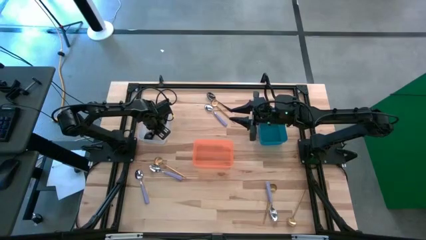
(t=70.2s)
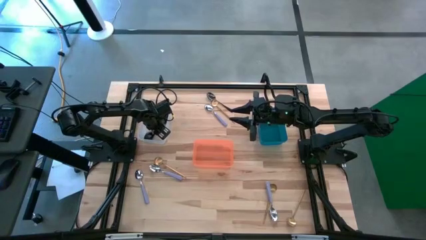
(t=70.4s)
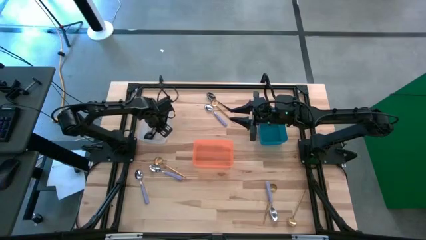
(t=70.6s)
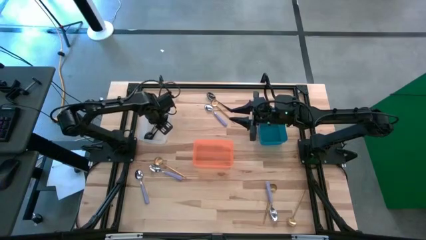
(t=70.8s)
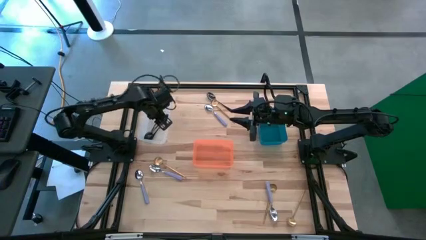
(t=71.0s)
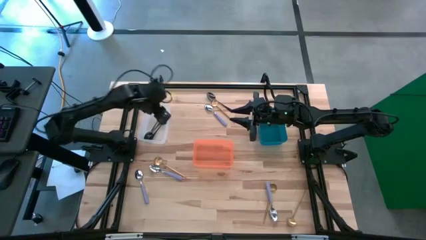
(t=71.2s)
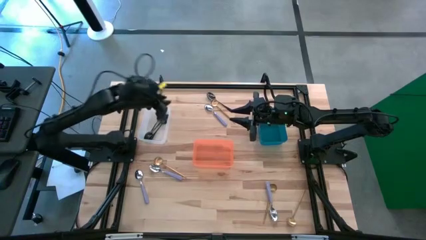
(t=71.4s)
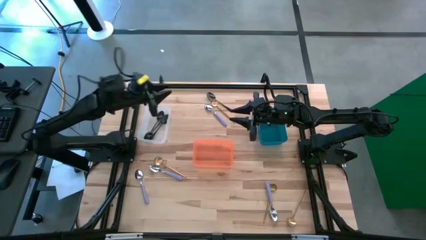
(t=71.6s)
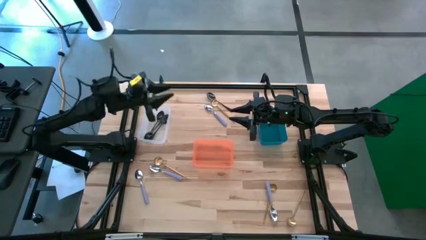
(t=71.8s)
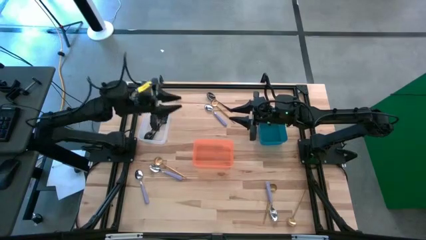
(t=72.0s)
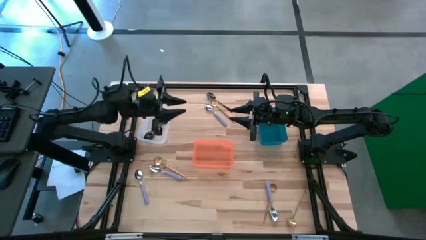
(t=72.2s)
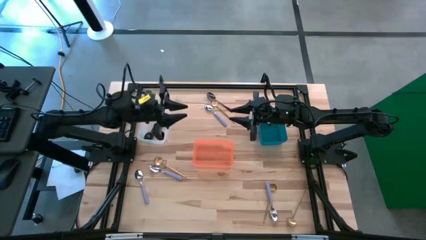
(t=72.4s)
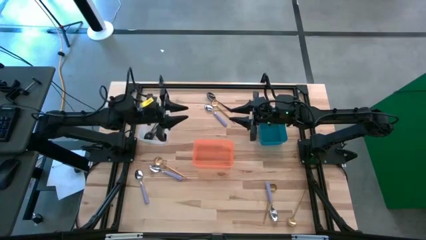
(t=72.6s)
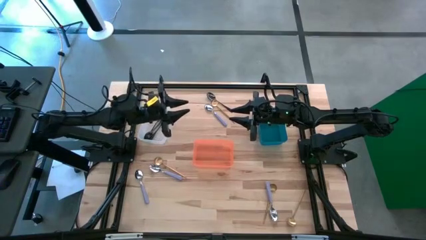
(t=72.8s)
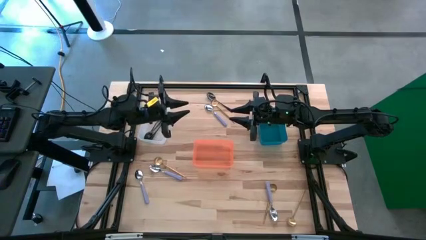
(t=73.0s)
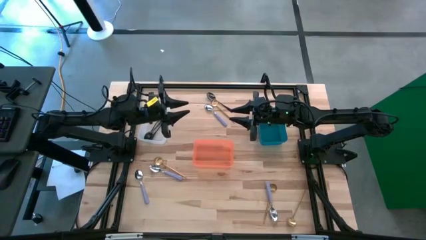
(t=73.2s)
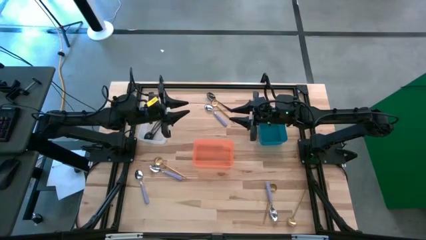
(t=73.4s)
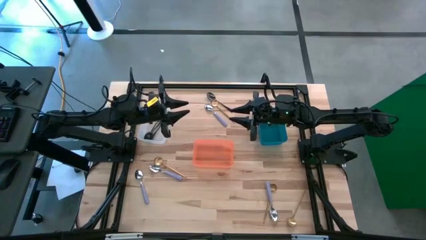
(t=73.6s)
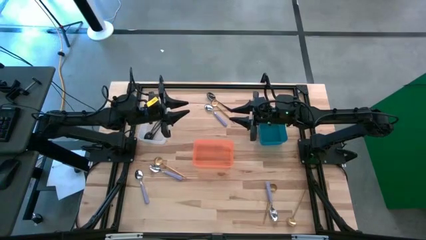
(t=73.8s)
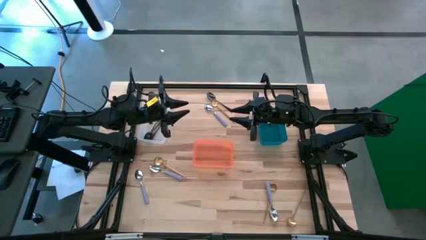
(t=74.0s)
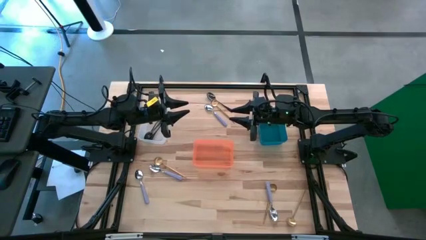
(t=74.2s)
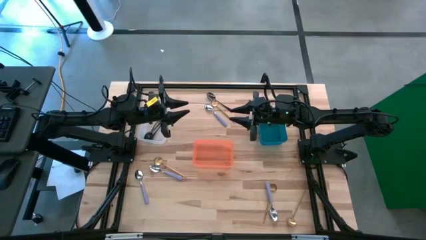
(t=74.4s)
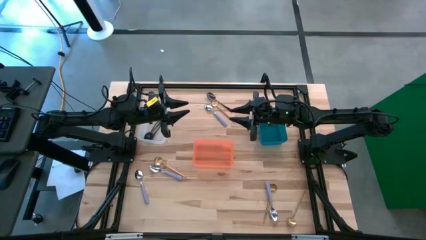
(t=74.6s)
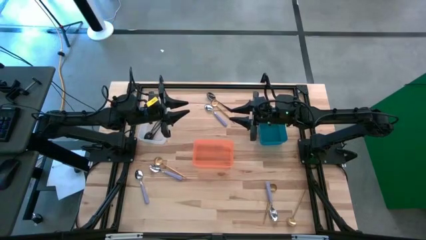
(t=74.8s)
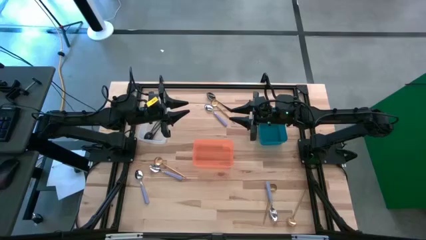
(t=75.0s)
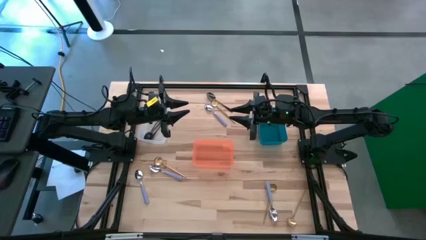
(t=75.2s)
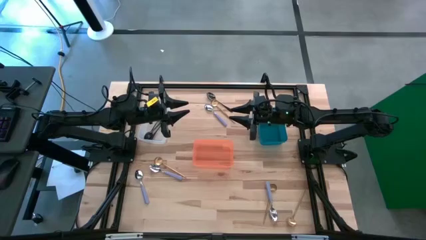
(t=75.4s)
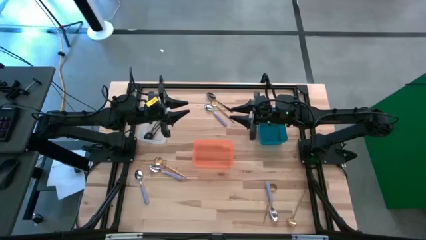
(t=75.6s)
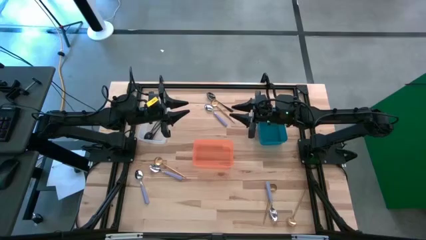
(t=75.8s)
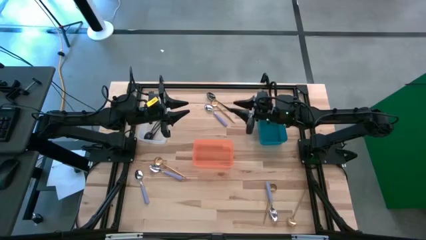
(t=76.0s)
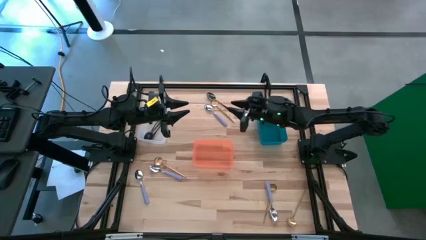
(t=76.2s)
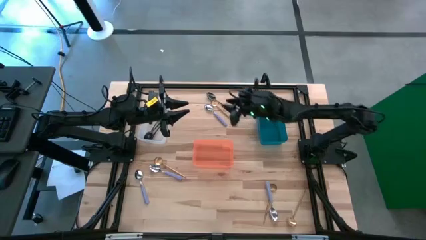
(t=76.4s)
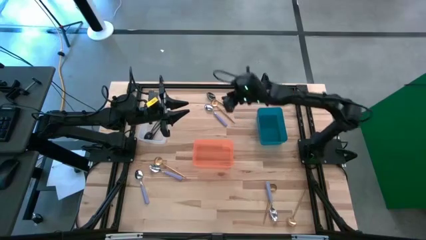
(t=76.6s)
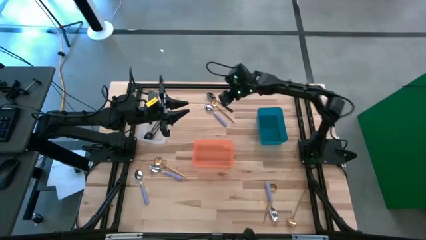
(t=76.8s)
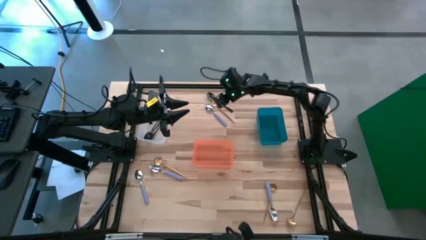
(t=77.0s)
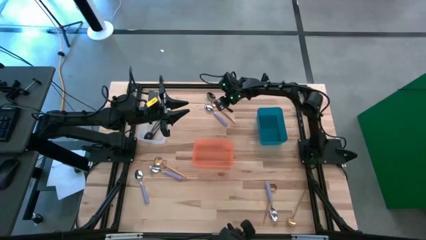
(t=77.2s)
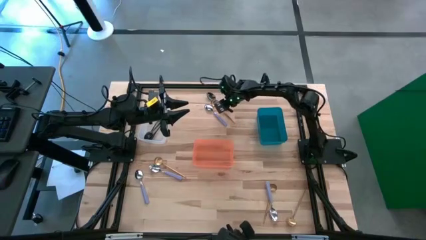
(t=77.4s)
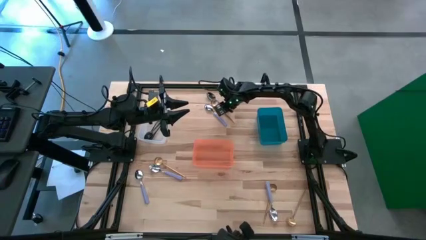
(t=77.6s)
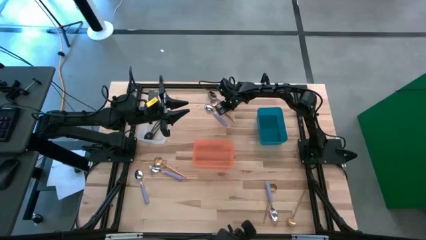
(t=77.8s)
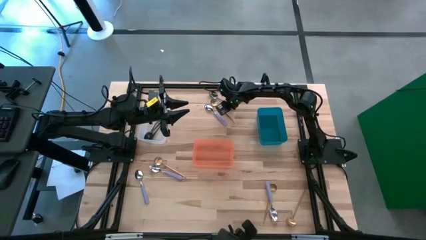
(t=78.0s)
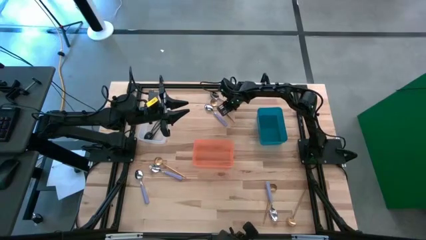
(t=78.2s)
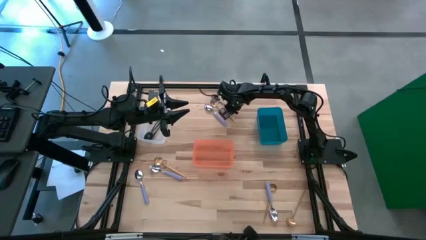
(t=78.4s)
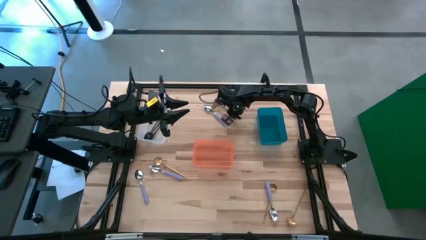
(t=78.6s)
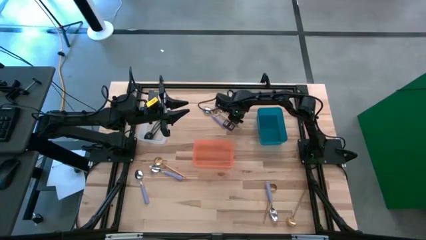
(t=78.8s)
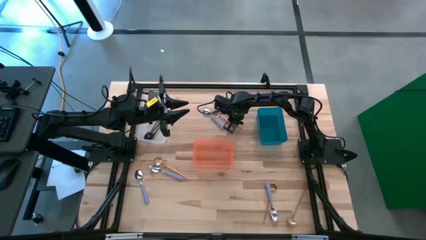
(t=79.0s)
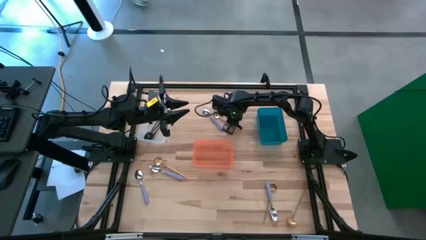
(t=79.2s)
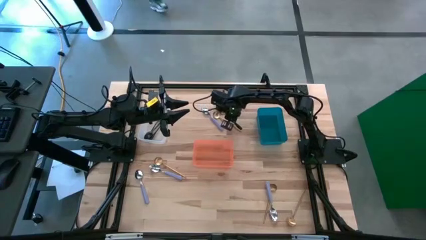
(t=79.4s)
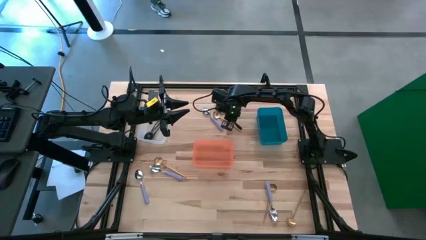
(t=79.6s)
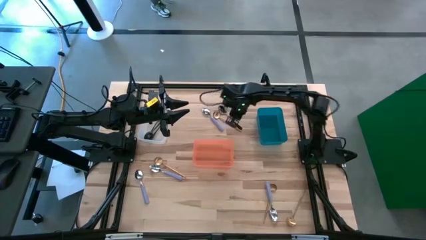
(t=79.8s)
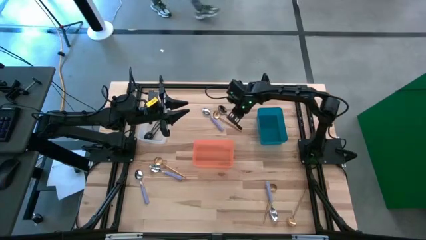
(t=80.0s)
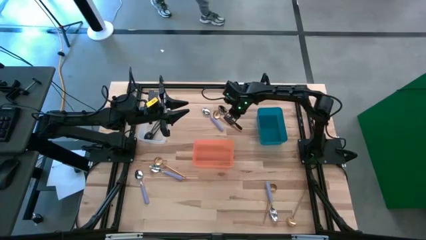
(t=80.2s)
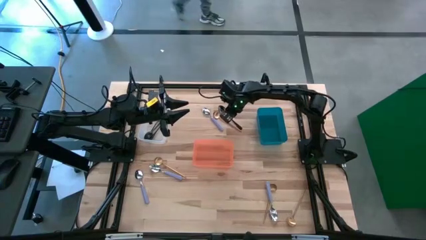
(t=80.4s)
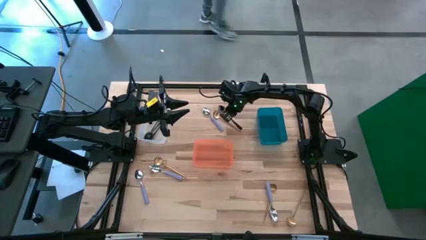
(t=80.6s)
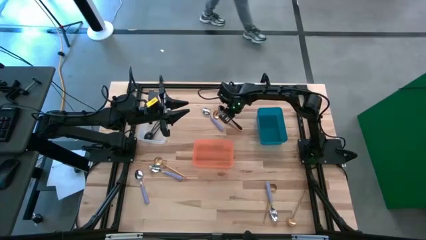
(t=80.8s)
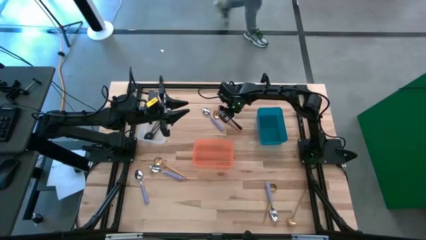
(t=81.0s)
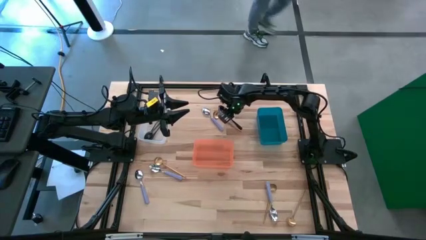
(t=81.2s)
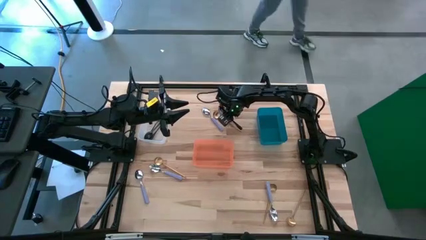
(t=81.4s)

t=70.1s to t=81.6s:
Task: Sort silverware by color (type)
Put the black spoon into the white bin

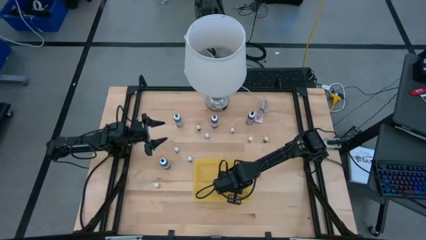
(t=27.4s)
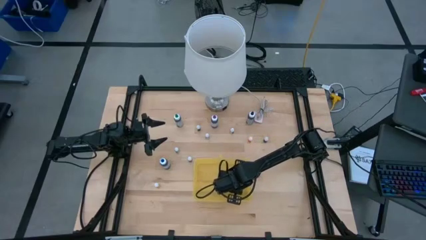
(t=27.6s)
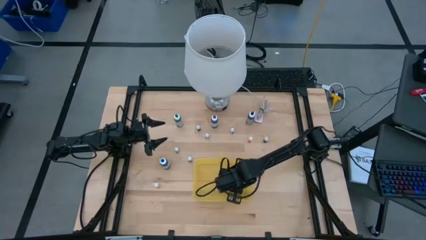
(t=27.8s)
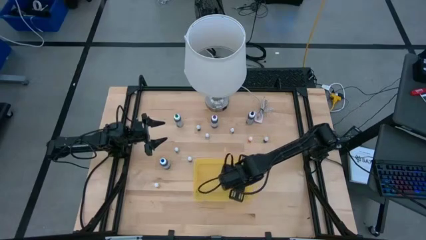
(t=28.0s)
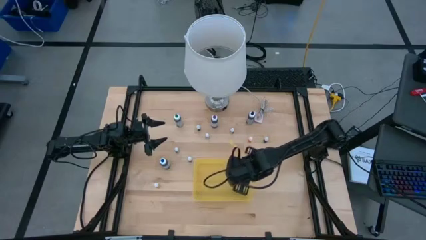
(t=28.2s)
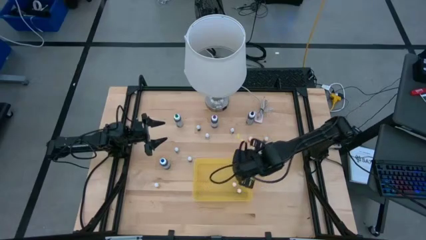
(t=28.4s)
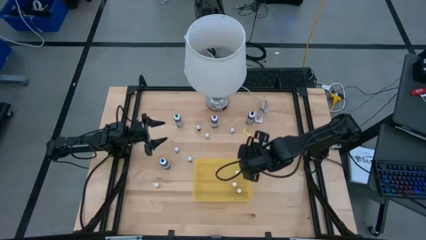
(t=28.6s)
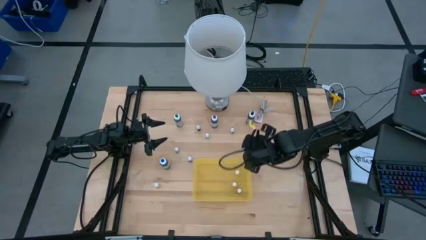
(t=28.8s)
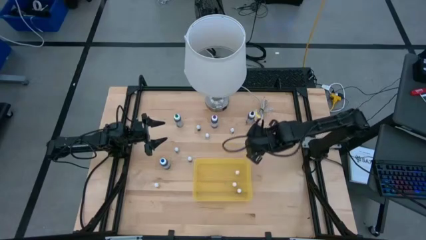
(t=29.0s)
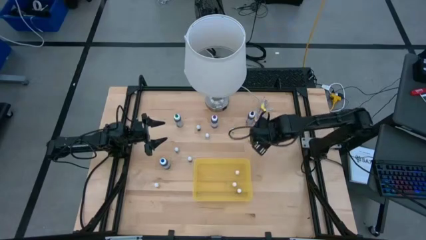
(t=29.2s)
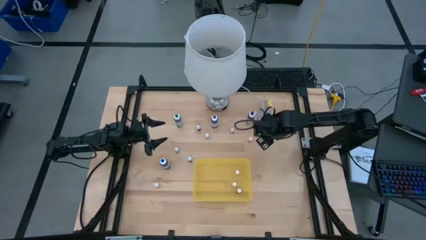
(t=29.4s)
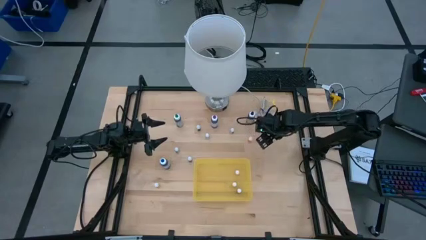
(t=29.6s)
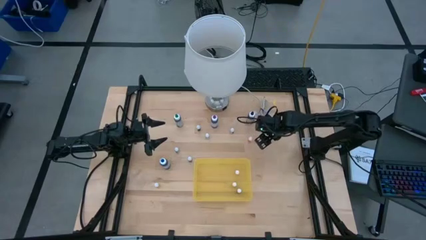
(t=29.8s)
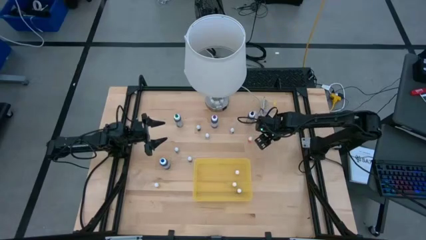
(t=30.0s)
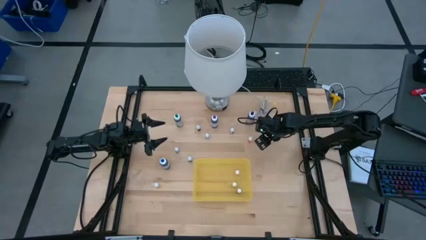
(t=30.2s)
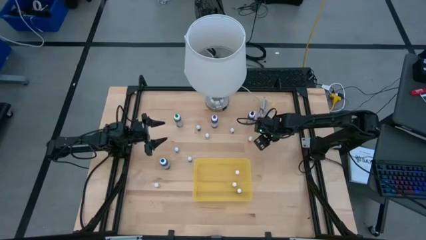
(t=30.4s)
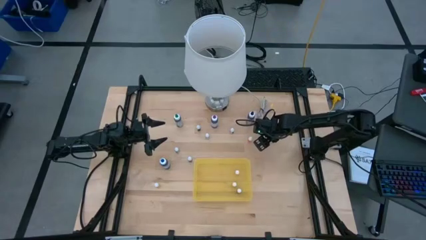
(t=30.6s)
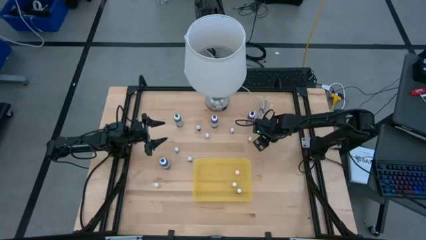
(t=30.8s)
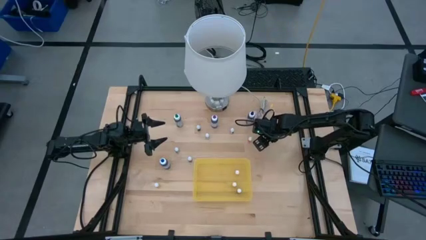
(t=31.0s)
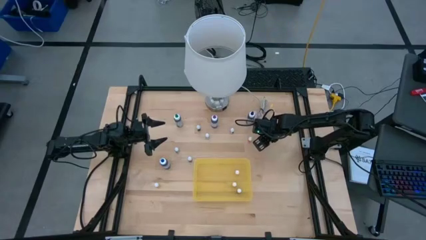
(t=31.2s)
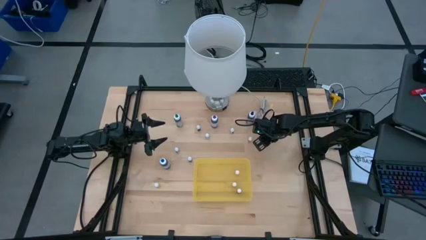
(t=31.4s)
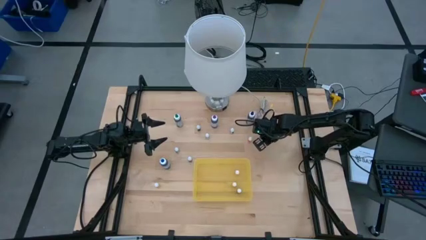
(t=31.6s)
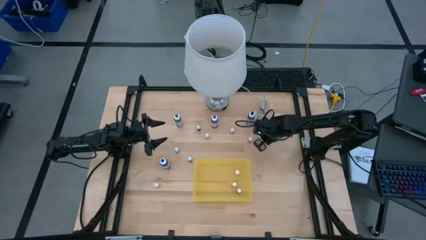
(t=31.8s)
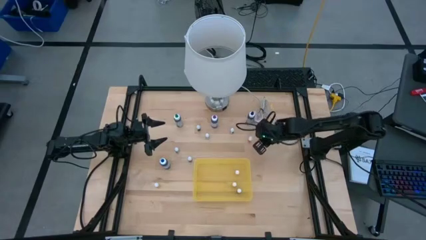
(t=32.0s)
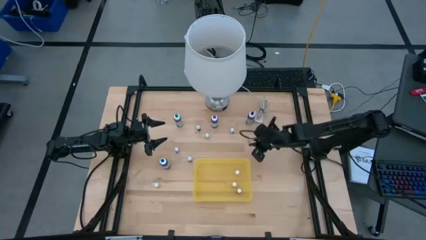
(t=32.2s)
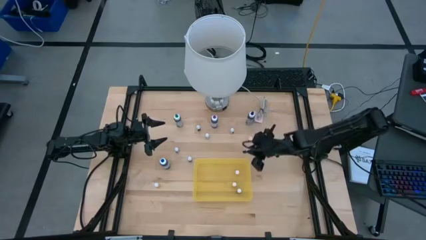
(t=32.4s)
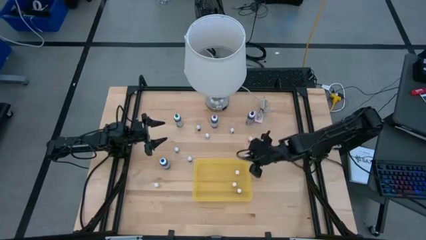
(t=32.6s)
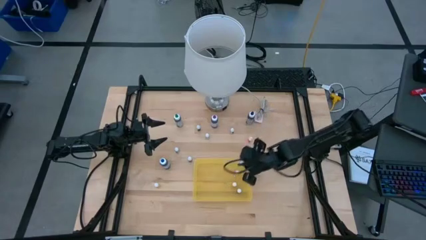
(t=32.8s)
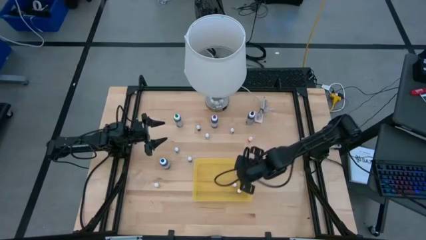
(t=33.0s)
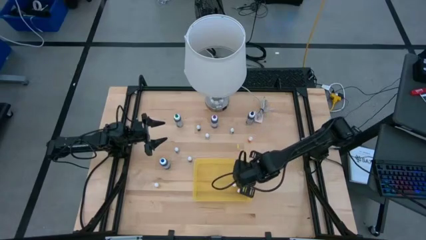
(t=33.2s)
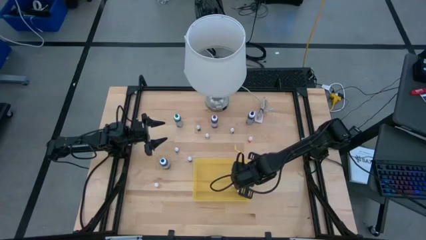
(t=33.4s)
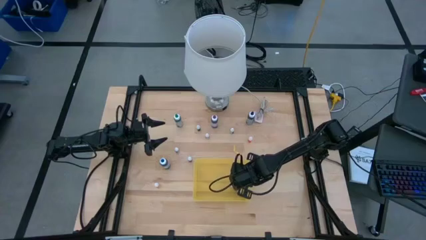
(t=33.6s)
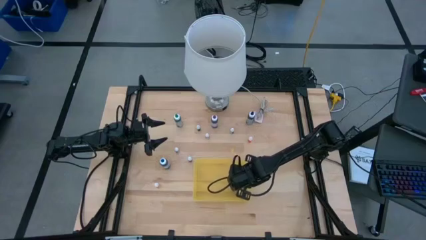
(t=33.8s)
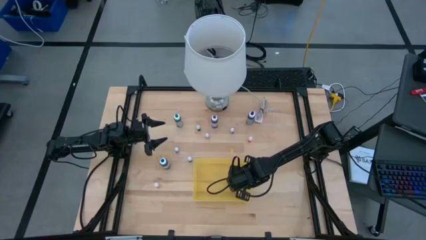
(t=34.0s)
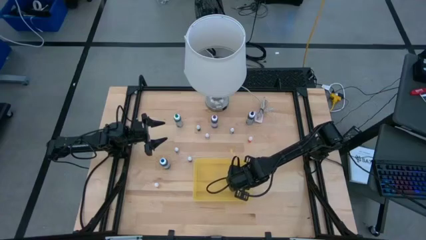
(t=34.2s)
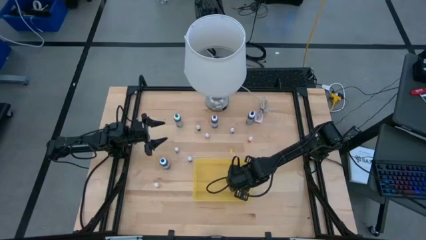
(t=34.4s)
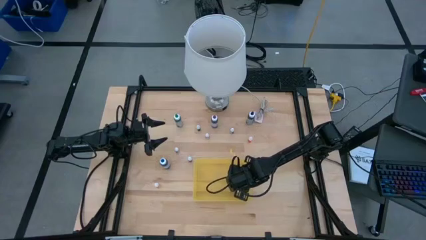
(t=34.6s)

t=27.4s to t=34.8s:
Task: Pick & Place food coloring
Put the small green food coloring bottle into the transparent bin
